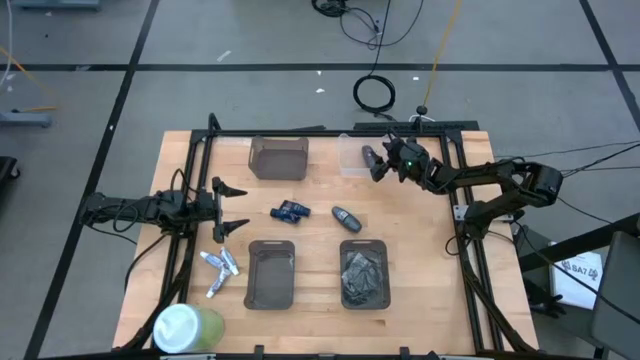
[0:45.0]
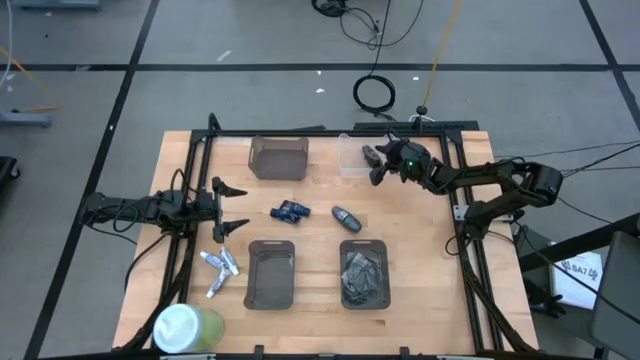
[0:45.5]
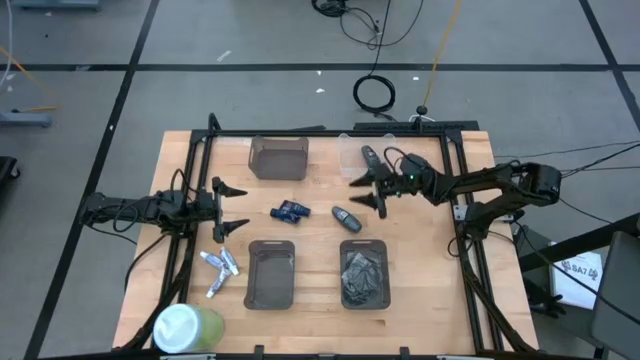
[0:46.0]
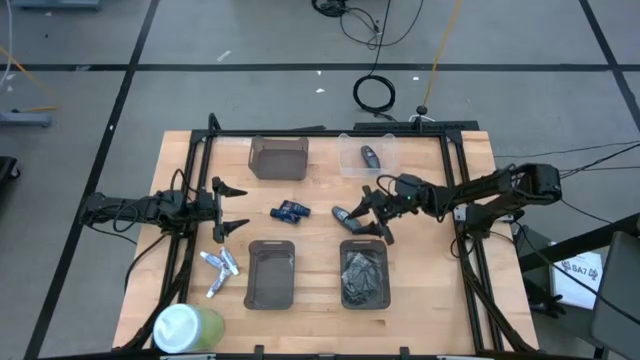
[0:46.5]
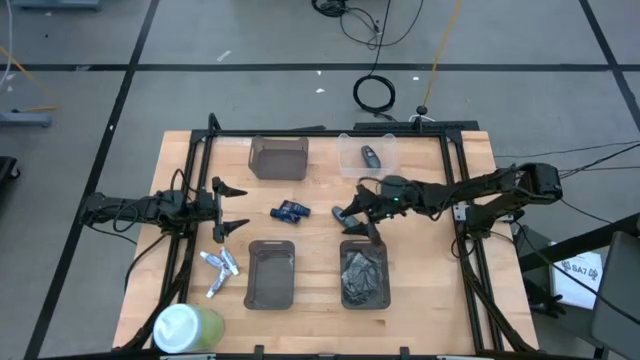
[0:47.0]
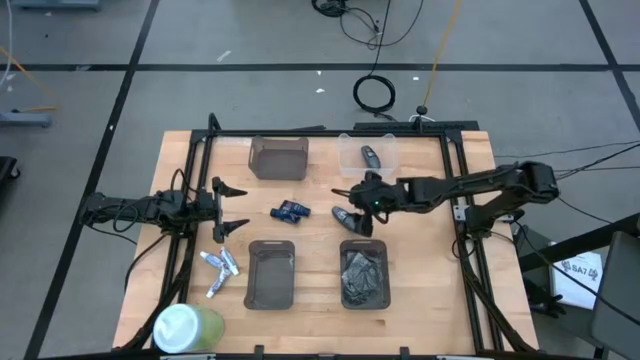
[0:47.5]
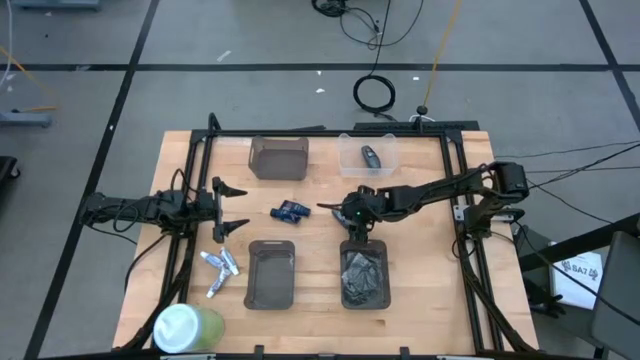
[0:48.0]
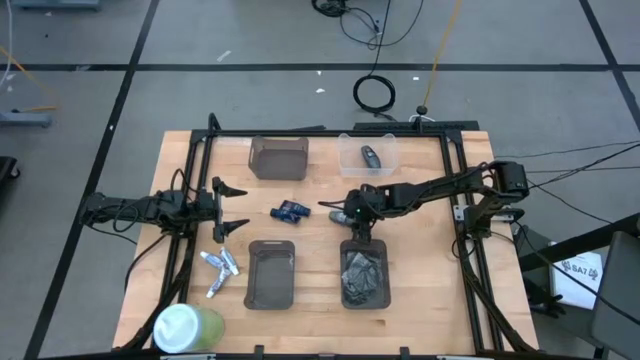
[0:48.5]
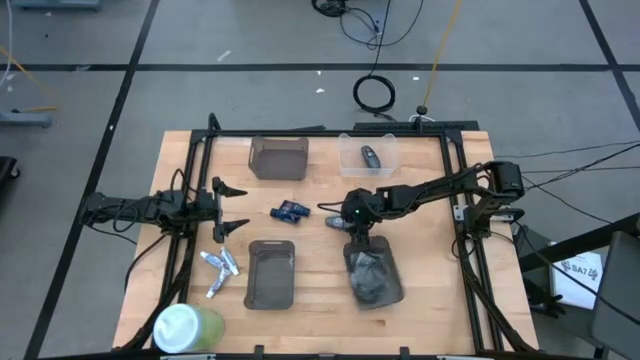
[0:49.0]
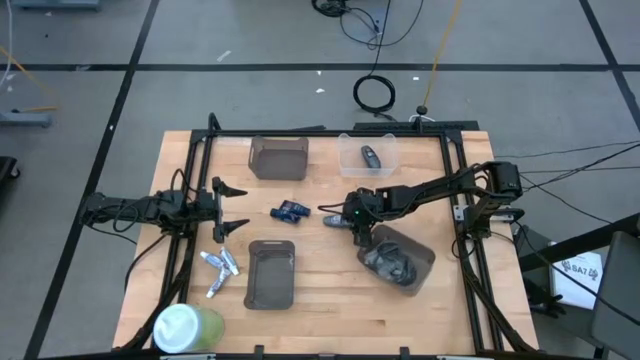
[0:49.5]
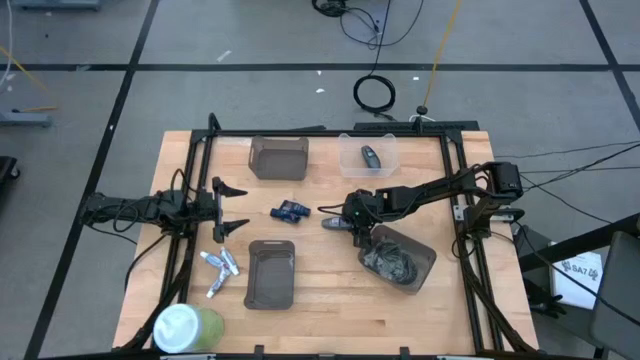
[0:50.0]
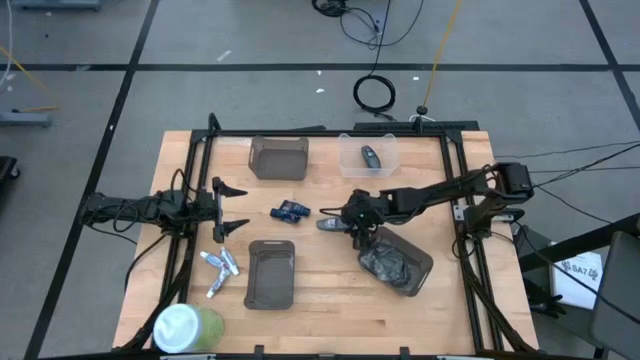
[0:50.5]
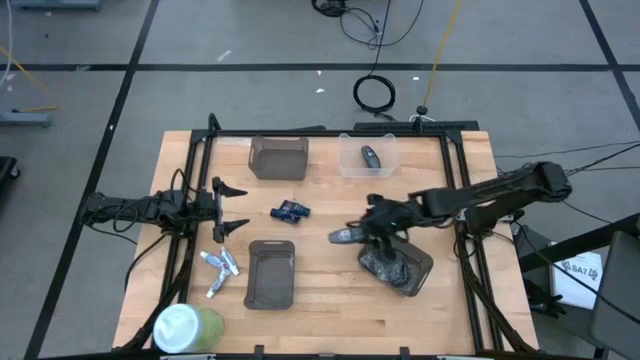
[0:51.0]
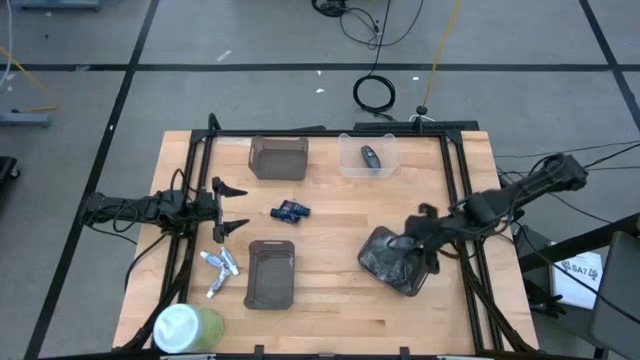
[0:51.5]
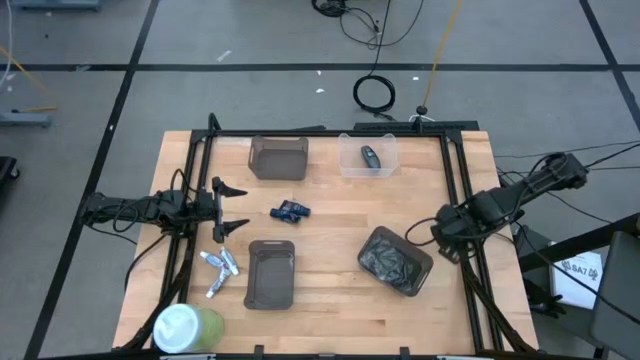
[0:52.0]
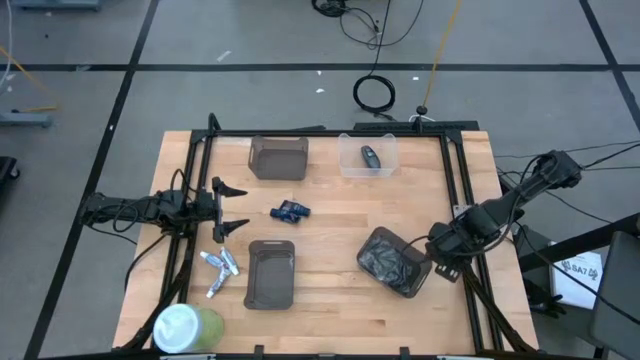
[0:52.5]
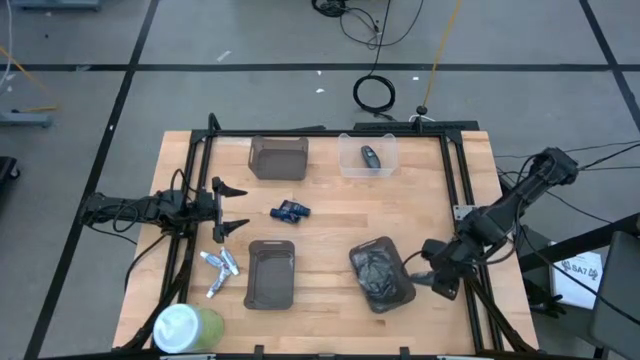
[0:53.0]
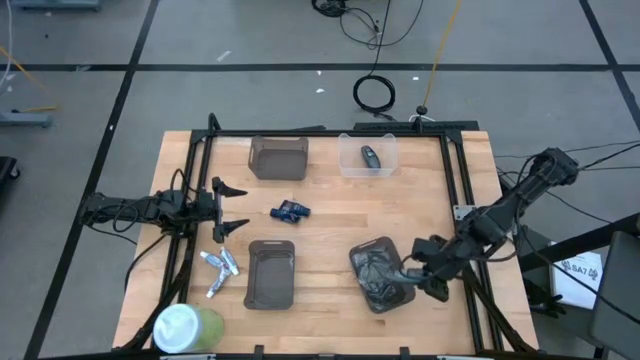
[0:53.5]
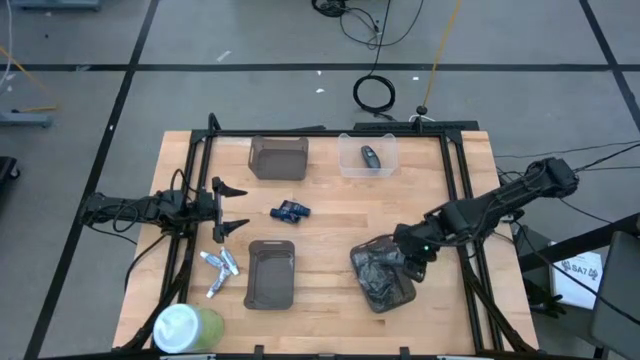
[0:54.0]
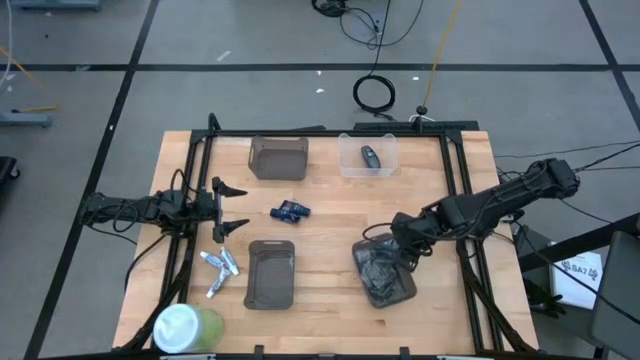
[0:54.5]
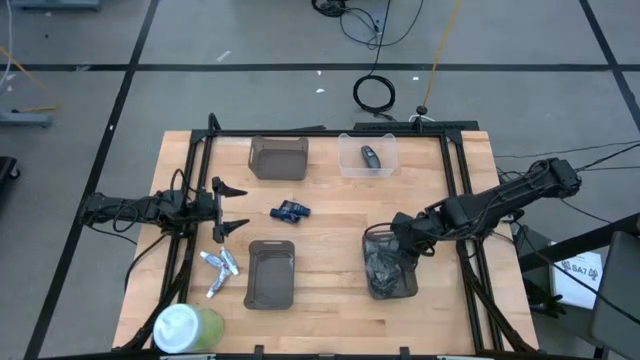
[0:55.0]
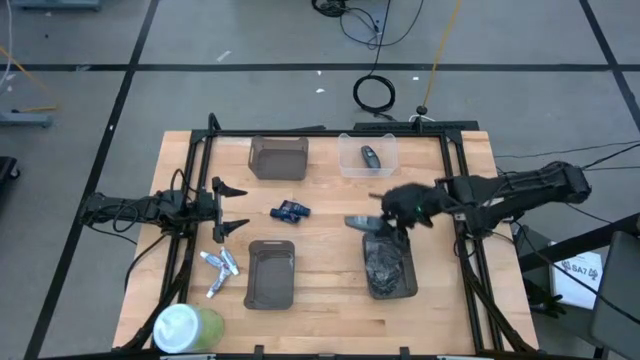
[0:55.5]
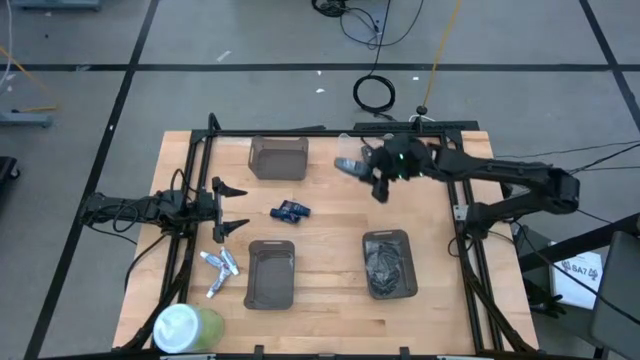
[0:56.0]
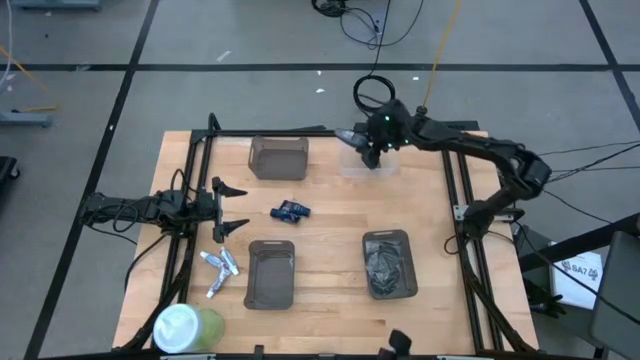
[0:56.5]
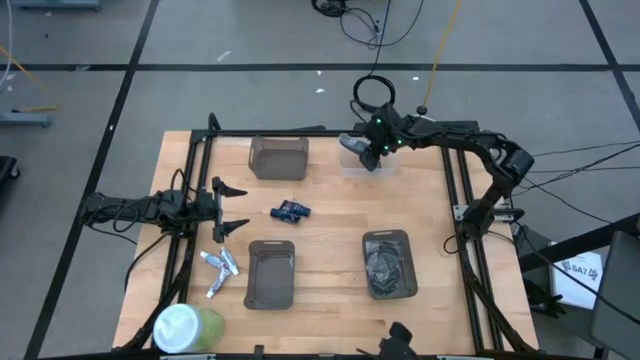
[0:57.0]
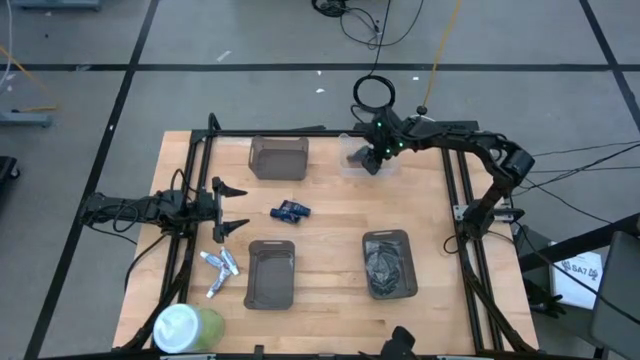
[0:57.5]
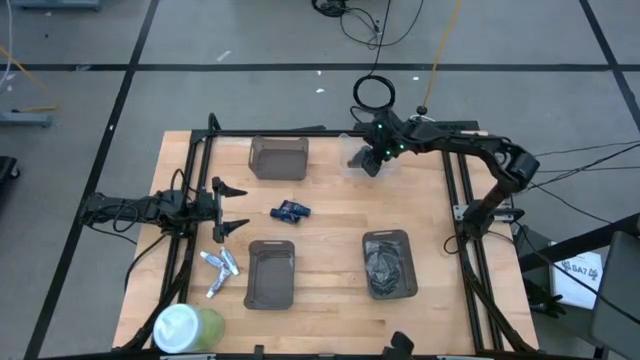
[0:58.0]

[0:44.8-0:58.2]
Task: Pick & Place Travel size toiletries
Put the gray deodorant into the transparent bin

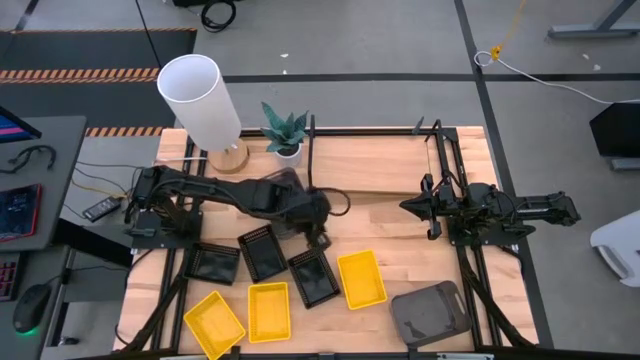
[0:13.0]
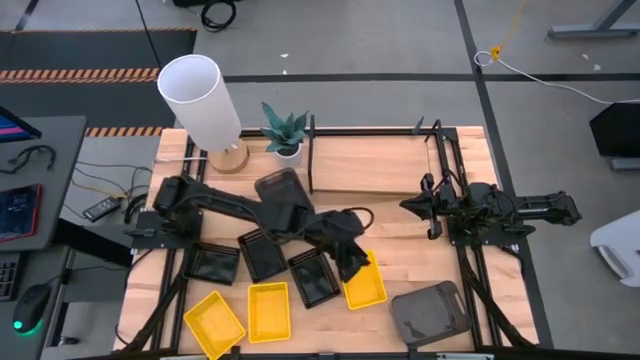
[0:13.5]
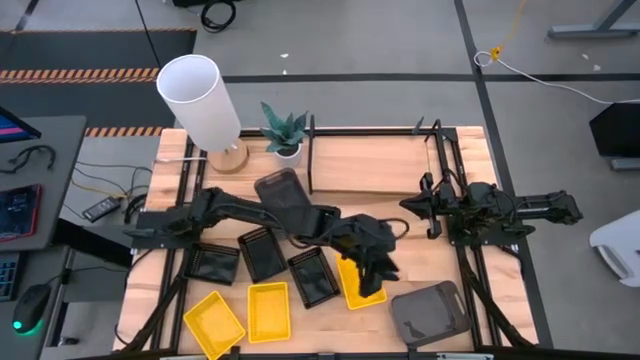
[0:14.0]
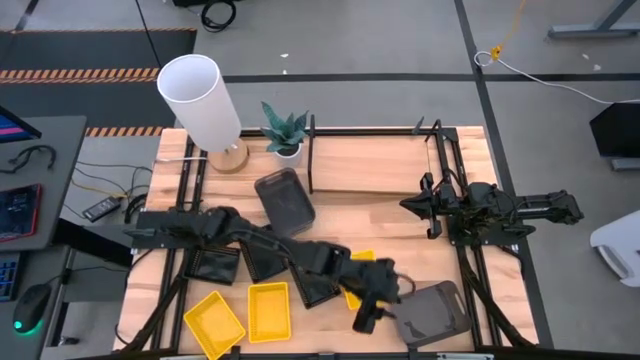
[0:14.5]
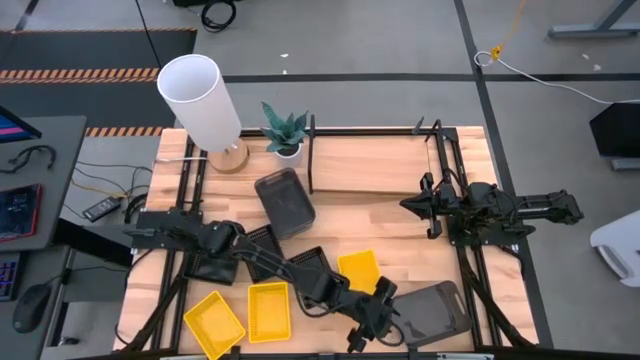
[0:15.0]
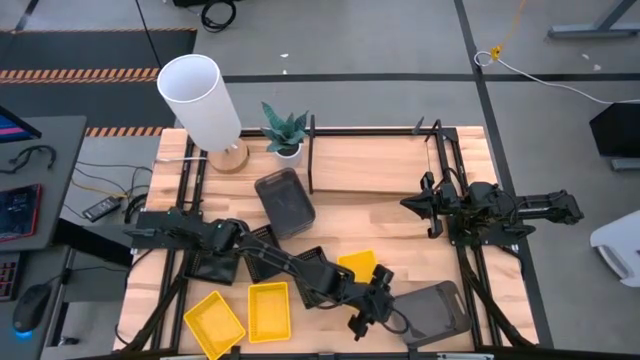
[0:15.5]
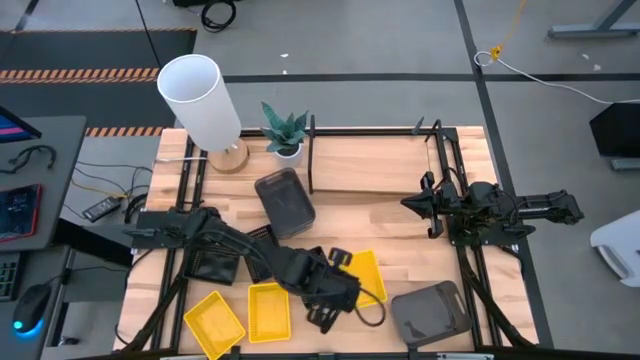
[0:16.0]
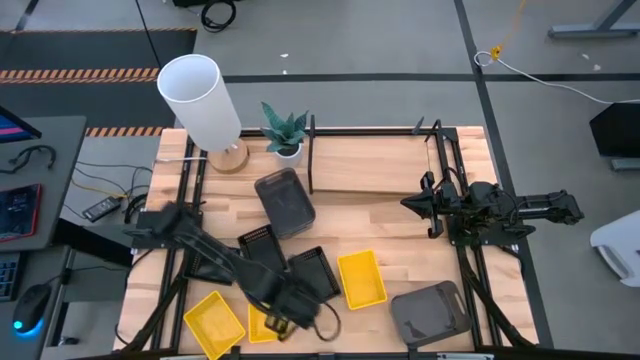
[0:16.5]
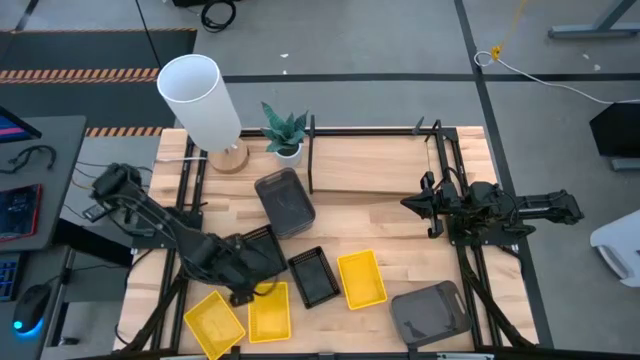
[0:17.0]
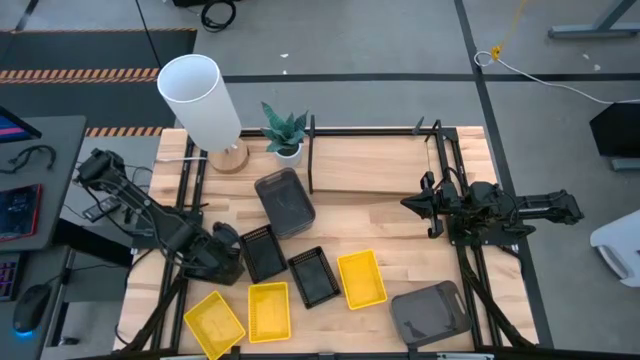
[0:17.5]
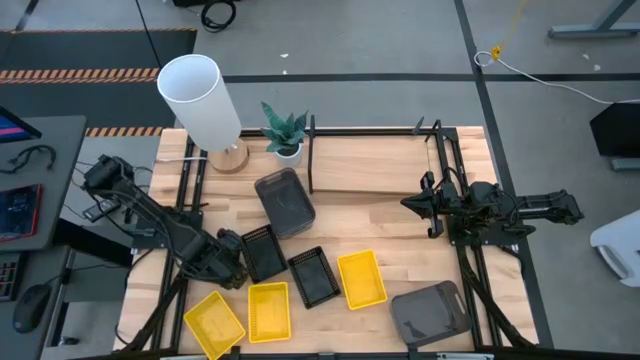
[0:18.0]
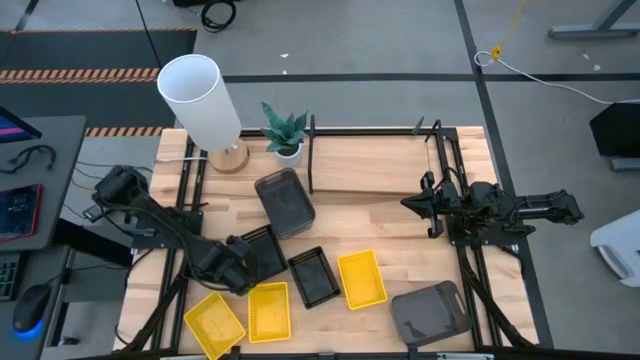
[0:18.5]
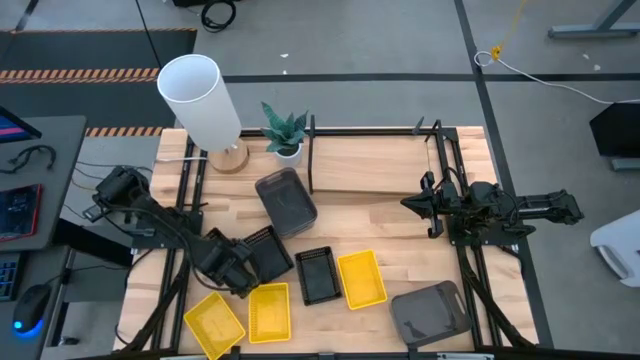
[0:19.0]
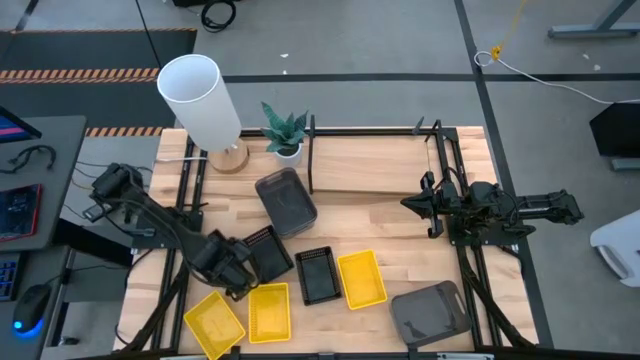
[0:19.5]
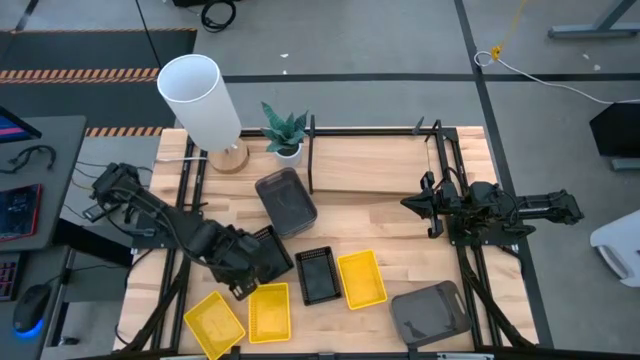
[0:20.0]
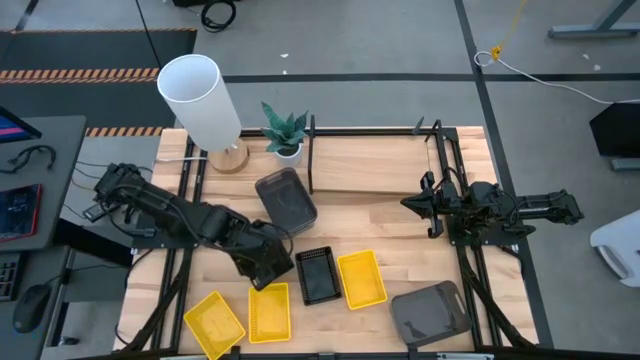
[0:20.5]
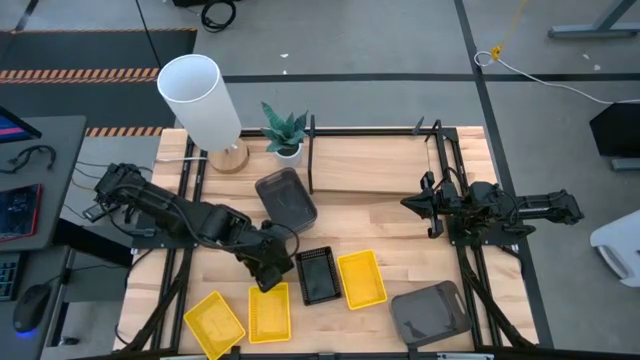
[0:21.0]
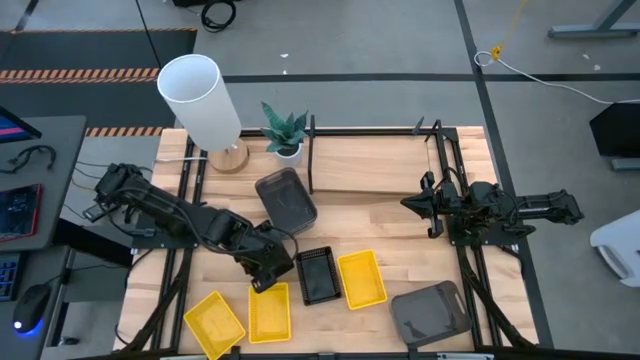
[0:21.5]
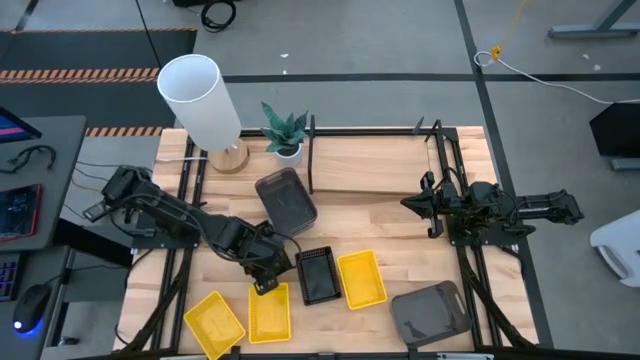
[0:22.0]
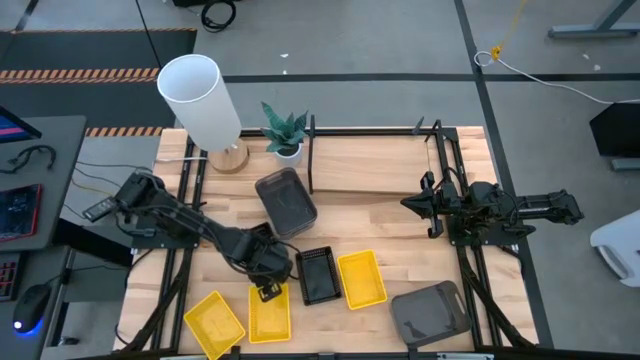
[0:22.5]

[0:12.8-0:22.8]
Task: Stack baskets on shelf by color
Stack the left black bin into the center black bin
